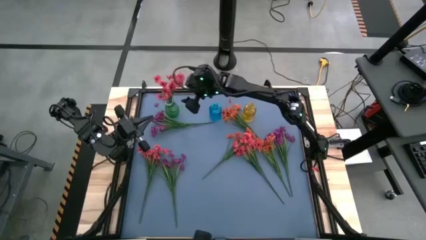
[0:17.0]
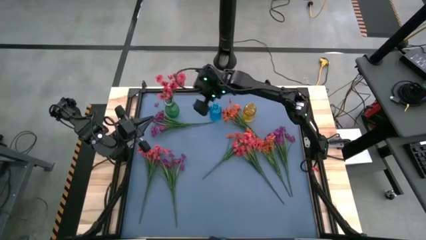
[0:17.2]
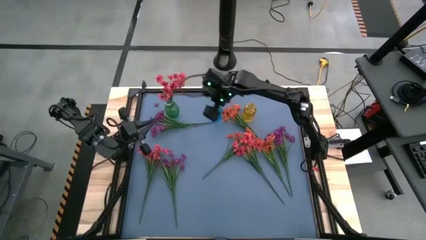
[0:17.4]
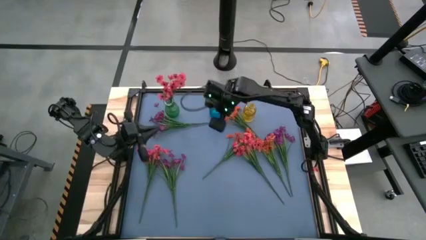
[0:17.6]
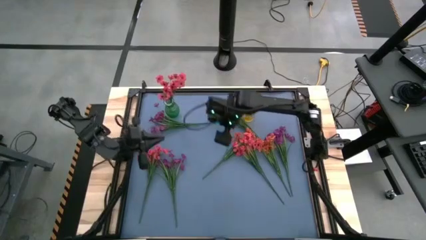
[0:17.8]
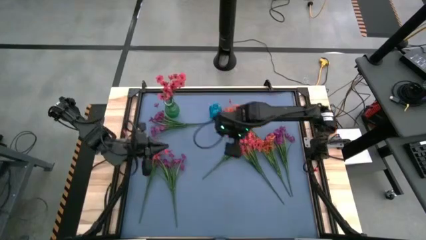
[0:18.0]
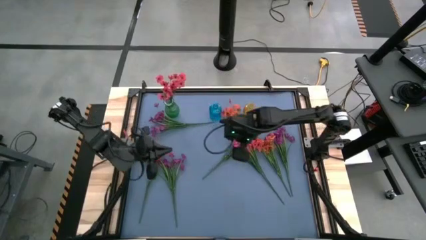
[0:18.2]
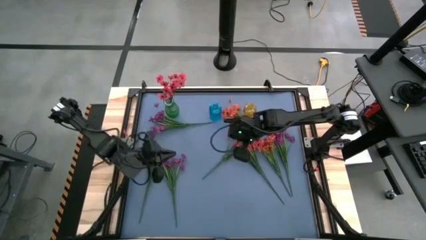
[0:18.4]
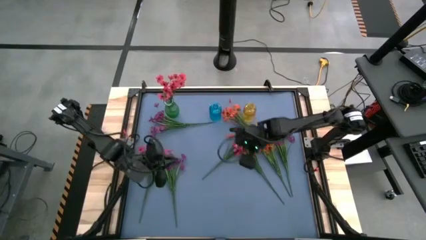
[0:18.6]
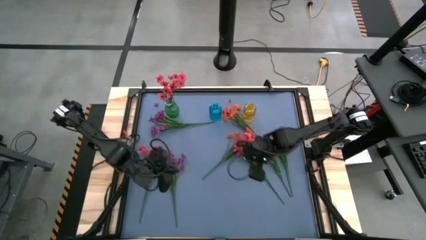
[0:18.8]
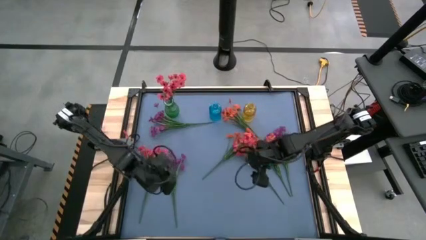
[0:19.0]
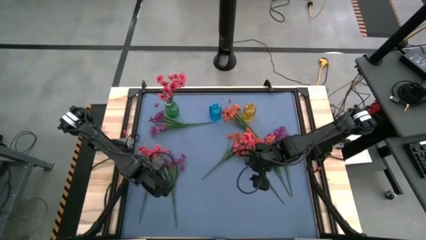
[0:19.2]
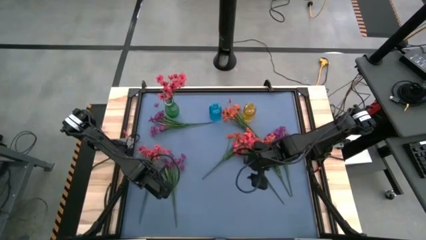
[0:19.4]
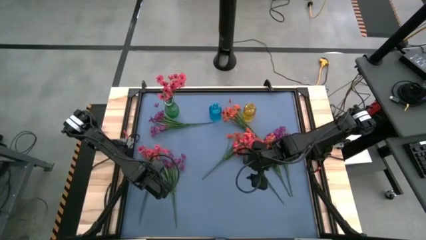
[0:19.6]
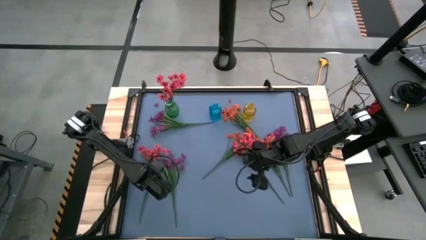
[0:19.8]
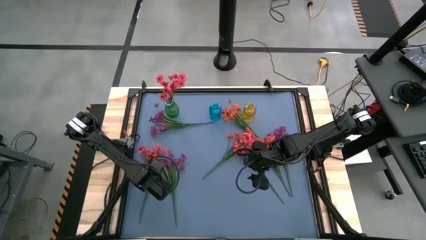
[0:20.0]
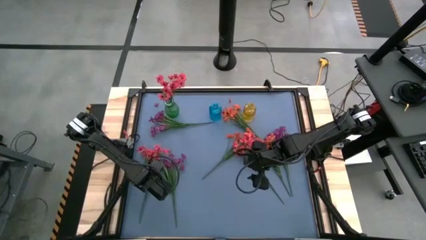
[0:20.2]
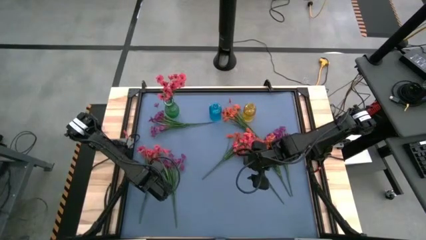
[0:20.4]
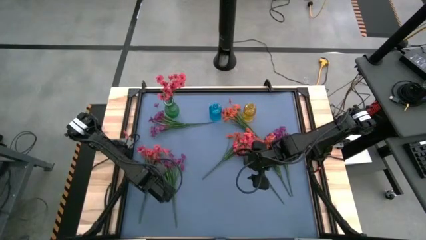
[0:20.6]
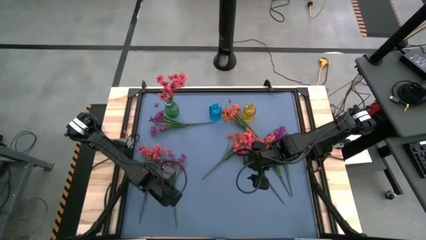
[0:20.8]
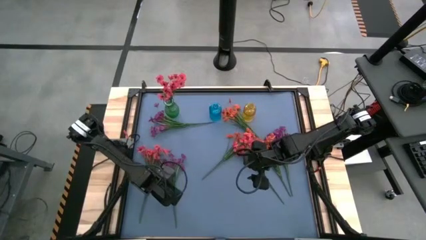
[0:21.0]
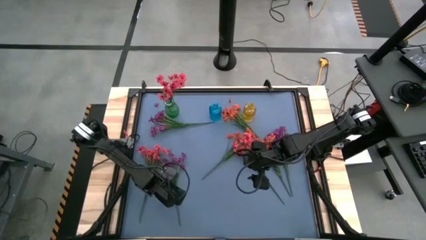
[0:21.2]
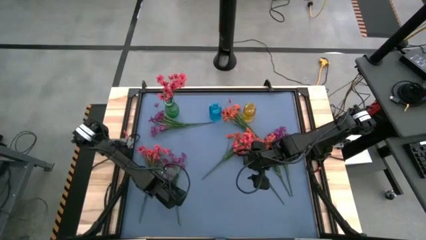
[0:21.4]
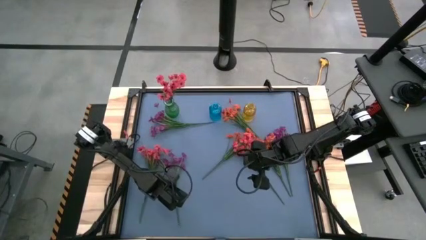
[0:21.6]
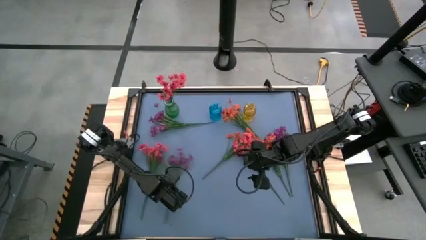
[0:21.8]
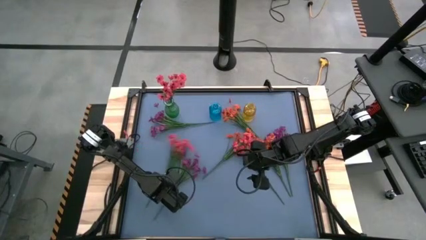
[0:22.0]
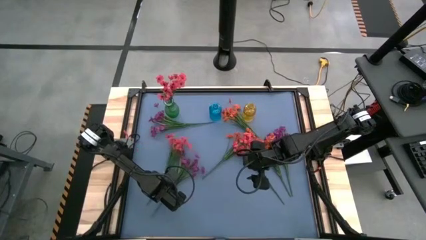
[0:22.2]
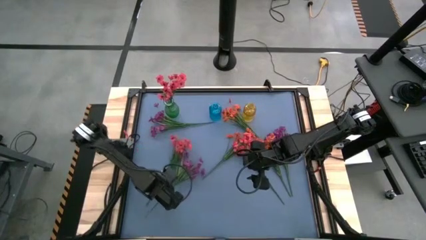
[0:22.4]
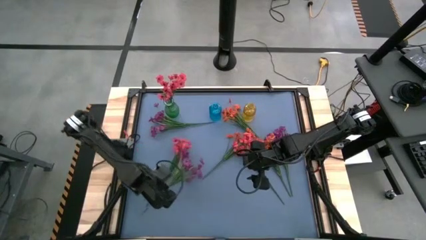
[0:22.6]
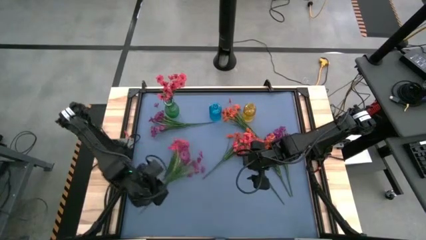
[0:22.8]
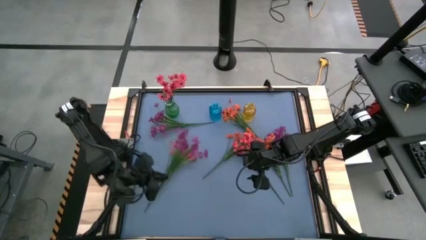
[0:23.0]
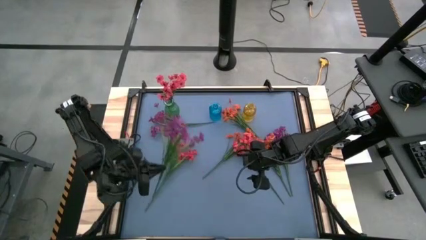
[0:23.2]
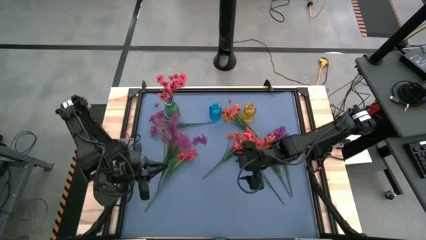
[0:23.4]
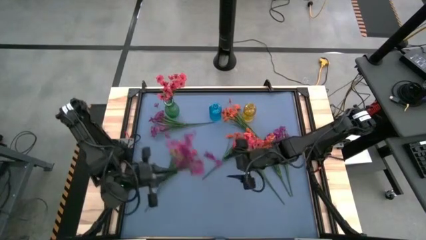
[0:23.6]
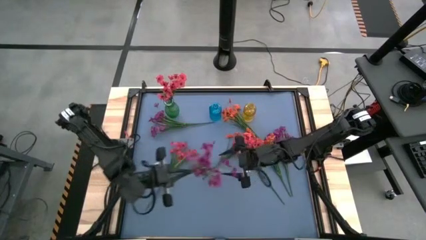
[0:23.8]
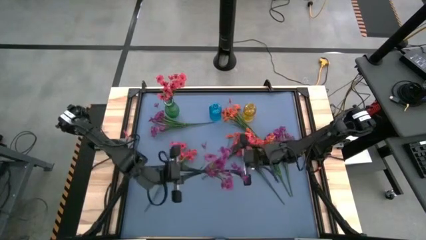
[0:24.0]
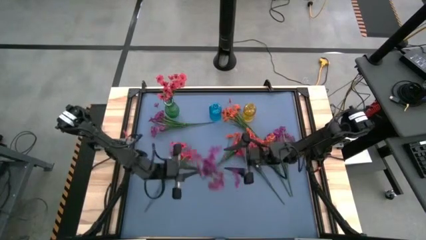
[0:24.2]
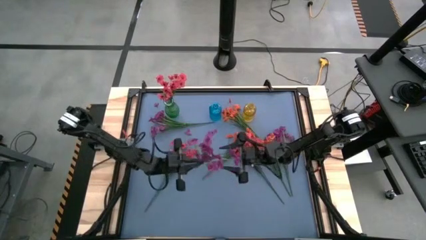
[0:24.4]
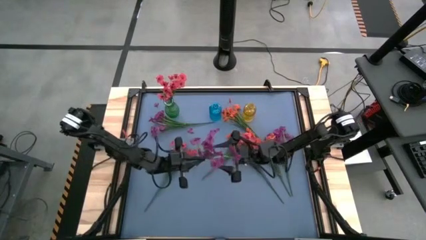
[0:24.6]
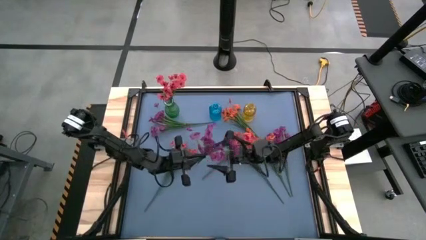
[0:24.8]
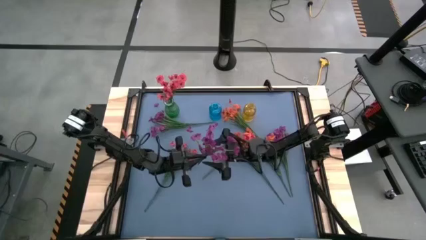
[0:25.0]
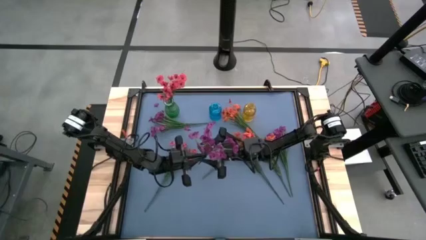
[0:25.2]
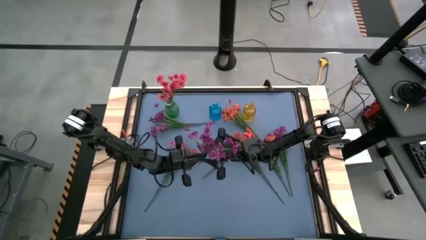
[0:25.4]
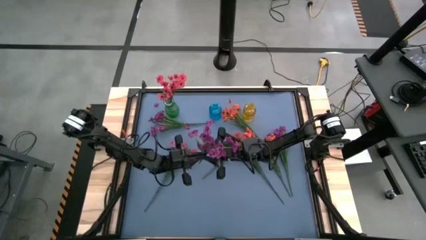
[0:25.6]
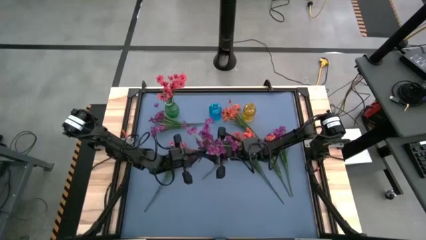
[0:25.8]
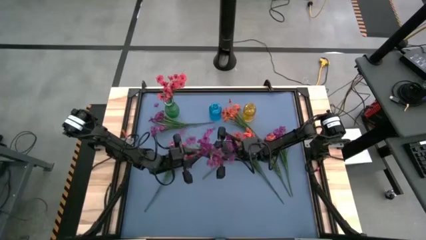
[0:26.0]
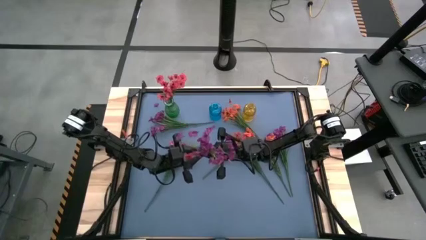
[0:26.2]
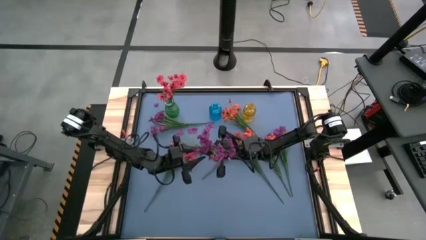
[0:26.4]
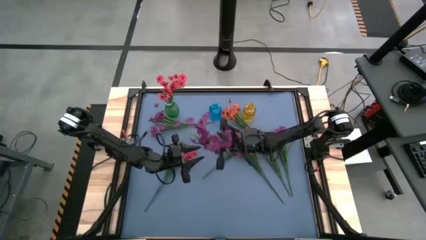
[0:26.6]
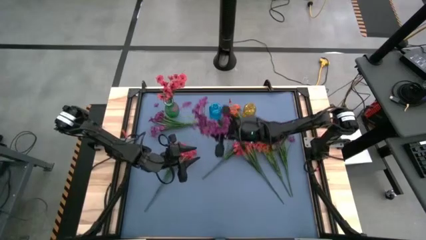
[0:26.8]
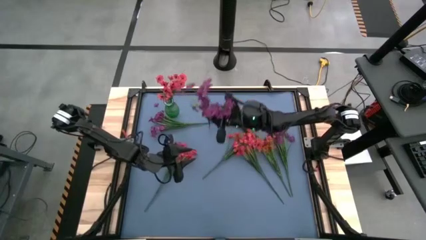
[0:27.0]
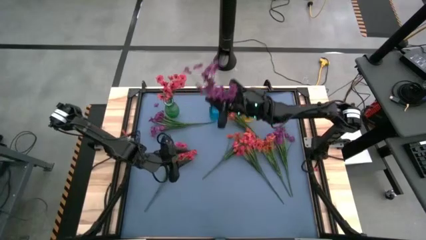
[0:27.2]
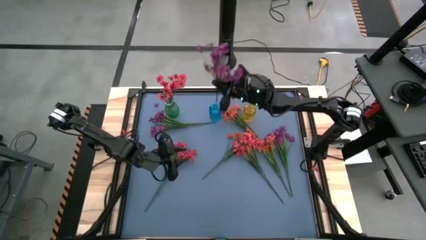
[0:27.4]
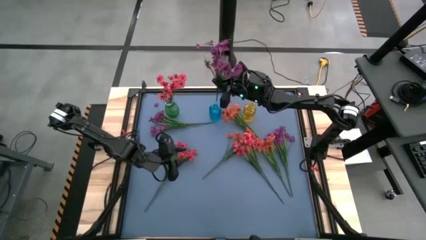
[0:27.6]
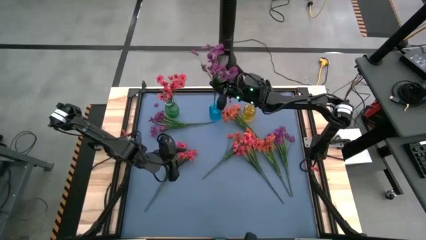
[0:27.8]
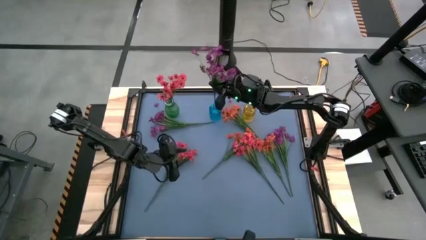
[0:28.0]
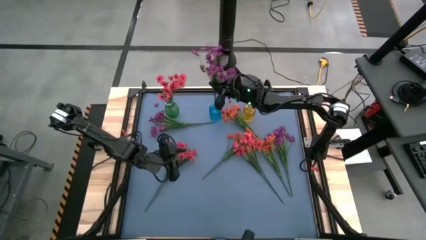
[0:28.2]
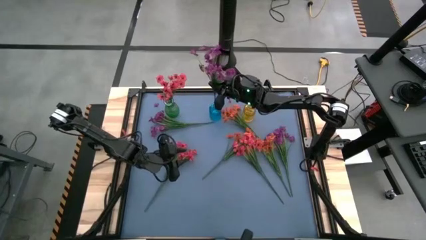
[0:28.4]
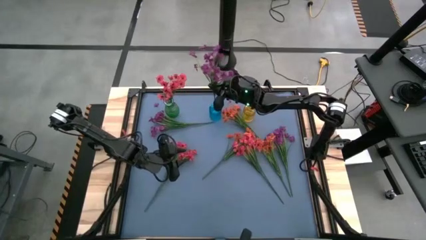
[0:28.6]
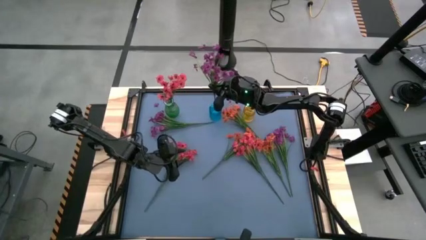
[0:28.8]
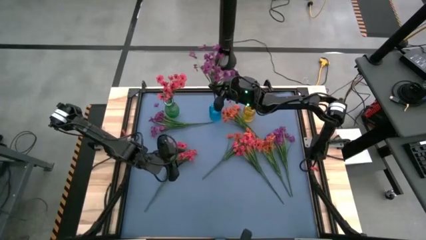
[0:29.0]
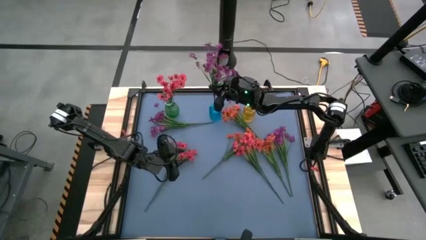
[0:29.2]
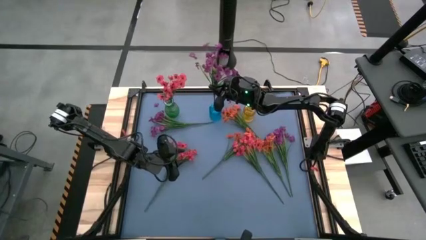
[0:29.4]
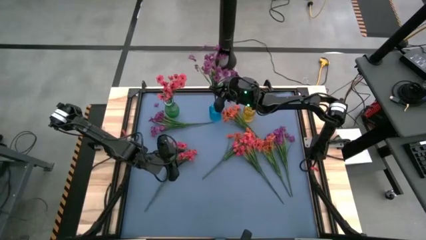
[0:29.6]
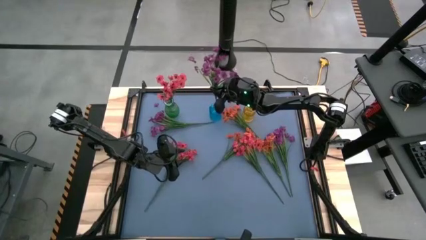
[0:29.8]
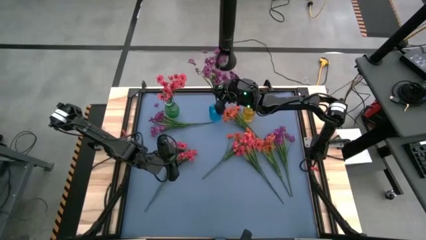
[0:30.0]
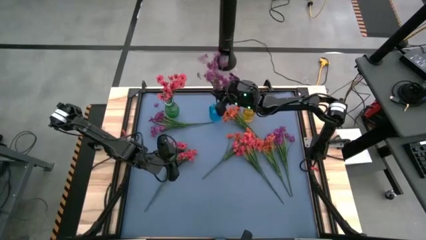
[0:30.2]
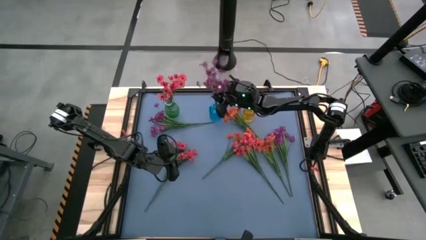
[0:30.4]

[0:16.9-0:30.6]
Task: Sort flowers into vase by color
Put the bottom left violet flower into the blue vase
